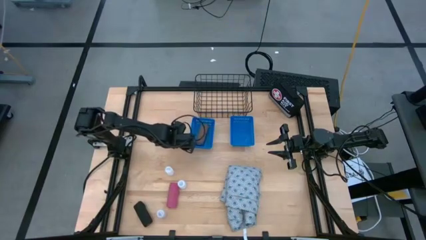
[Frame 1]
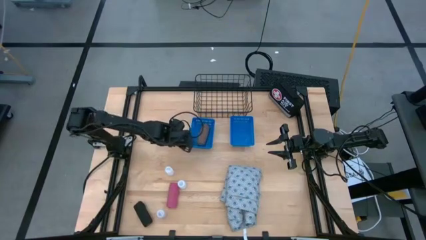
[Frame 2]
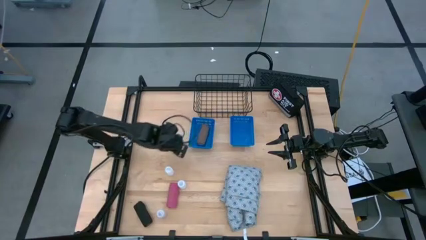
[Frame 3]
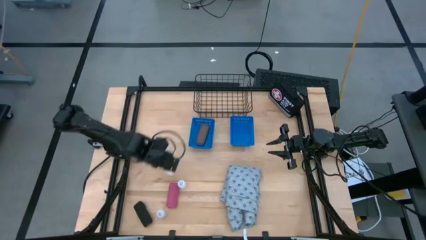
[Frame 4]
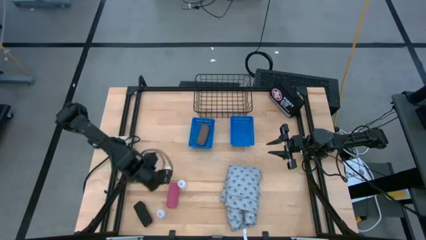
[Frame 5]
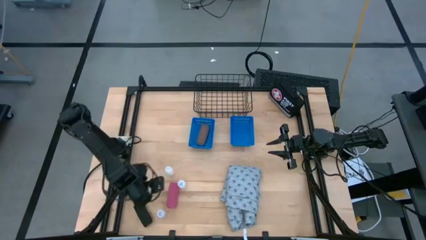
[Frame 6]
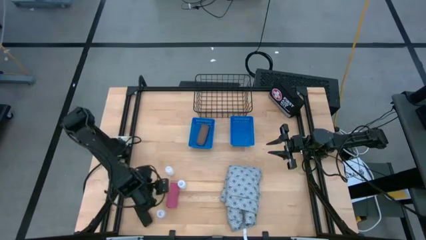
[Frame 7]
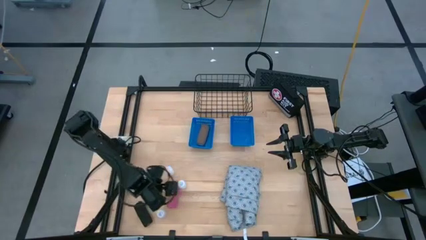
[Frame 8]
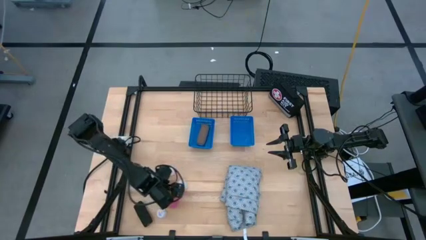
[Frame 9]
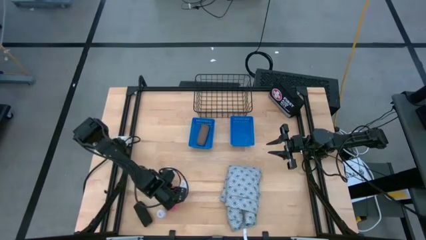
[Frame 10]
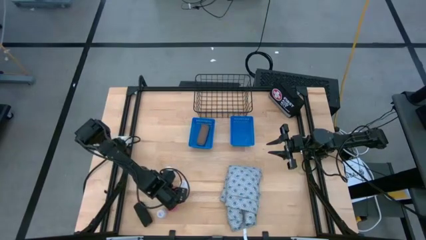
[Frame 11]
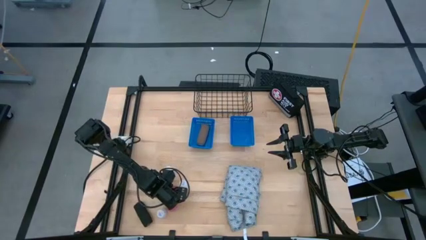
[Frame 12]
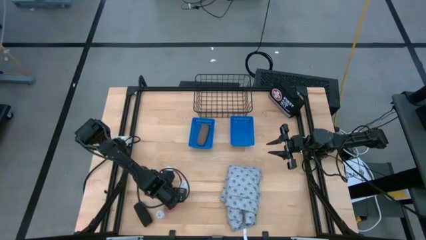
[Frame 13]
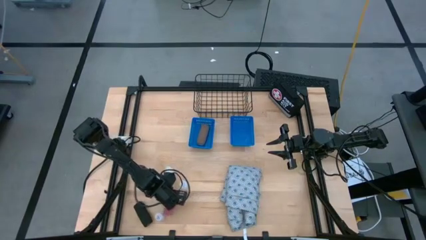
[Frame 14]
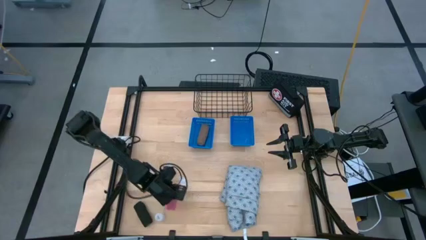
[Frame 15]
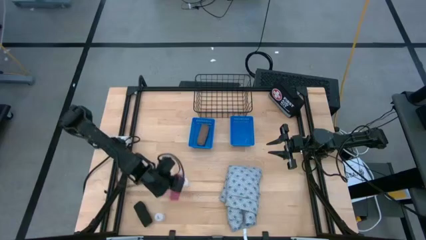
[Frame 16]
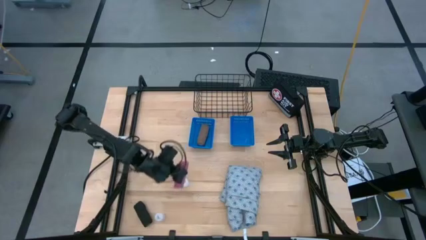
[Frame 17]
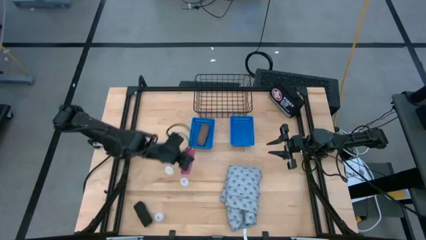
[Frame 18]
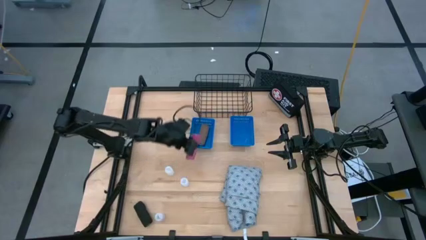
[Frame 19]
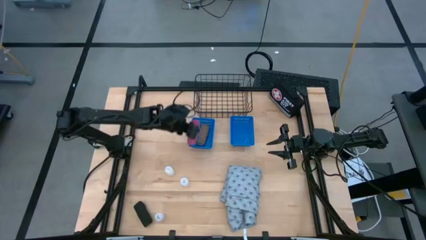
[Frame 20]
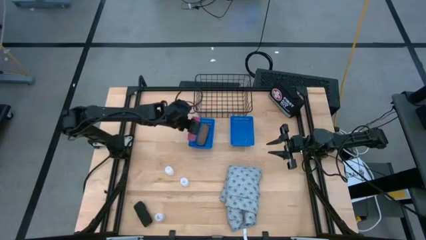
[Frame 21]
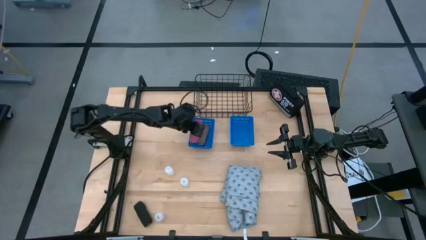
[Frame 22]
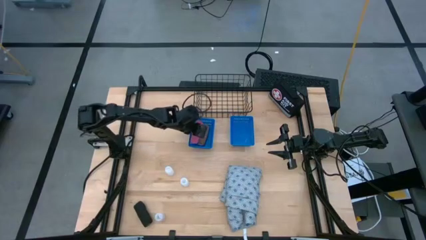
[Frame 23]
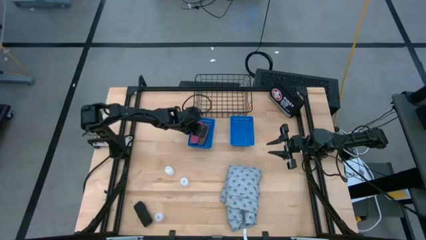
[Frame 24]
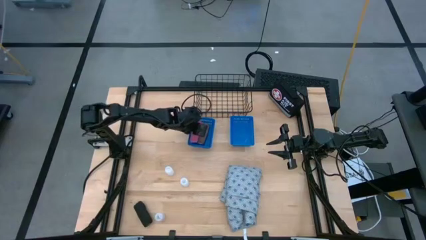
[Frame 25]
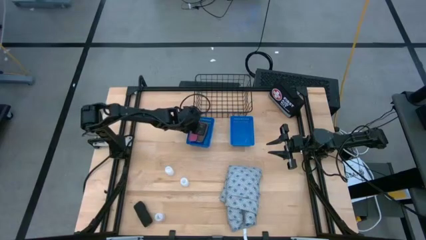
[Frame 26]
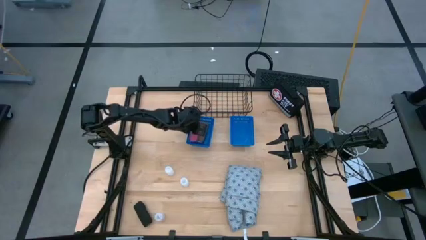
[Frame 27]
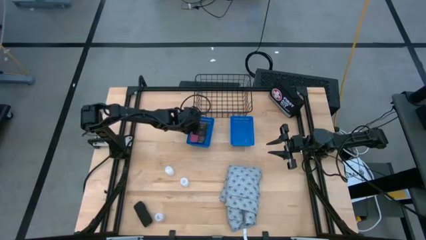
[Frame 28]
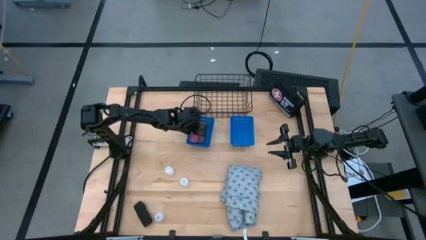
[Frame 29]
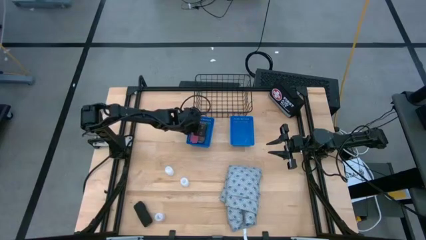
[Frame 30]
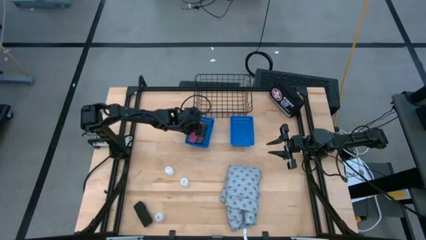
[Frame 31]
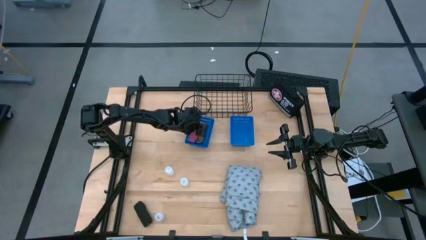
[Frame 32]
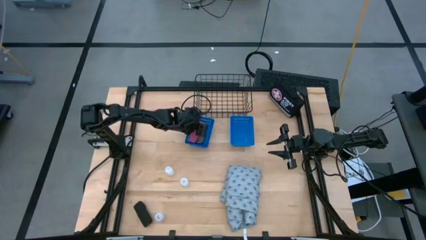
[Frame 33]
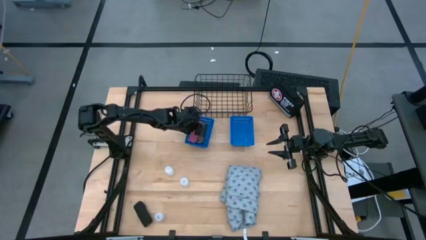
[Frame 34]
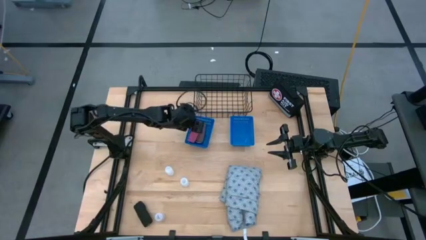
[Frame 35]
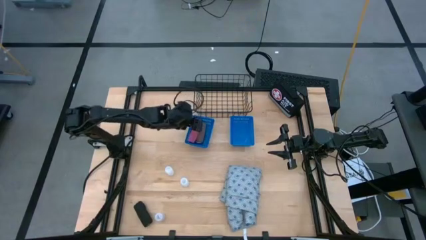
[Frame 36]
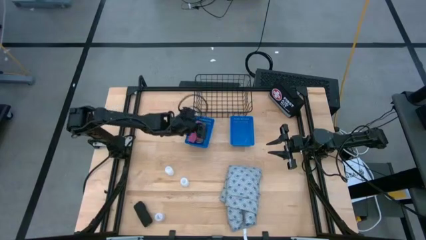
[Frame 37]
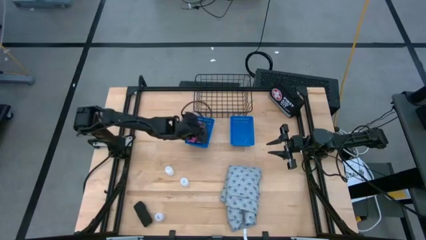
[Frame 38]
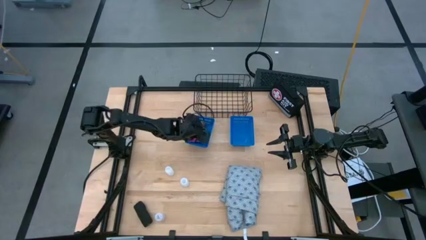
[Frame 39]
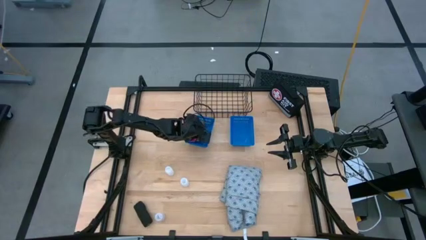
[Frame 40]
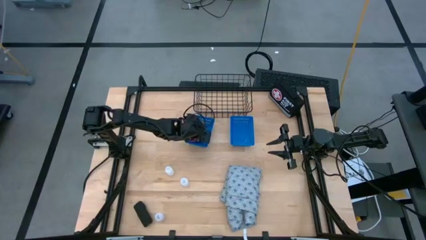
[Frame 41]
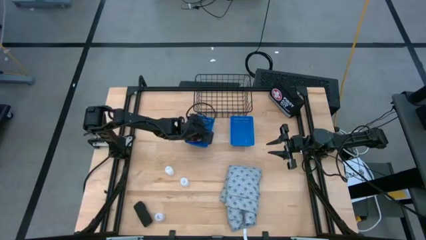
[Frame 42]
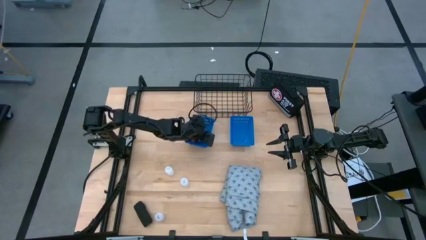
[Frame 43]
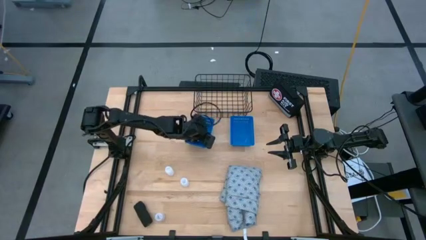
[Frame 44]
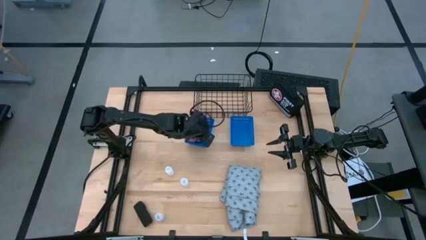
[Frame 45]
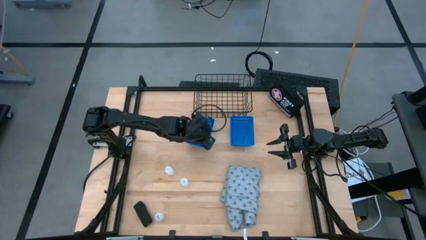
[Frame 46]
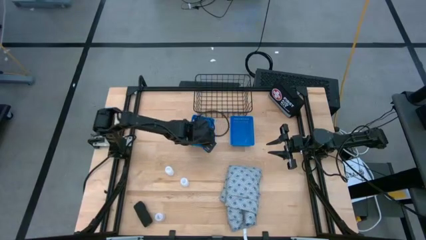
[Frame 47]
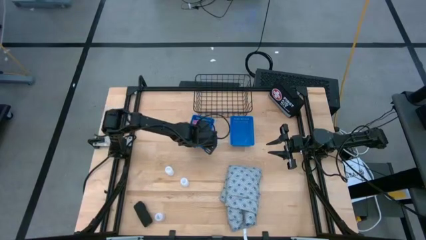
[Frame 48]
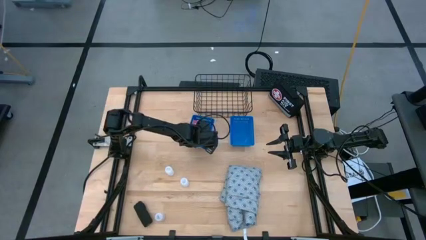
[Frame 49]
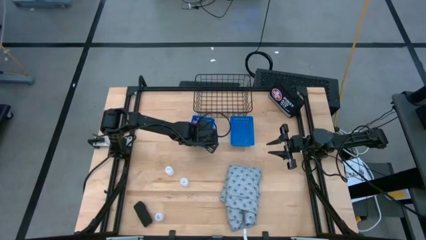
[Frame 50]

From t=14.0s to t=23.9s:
Task: Pick & Place Medicine items
Put the pink bandage into the left blue bin
